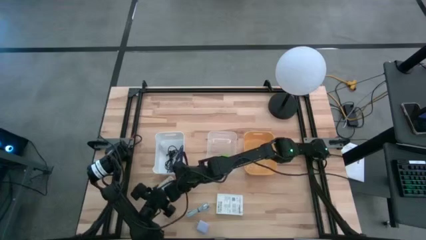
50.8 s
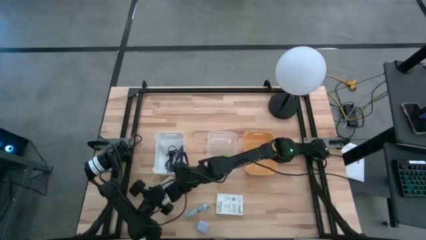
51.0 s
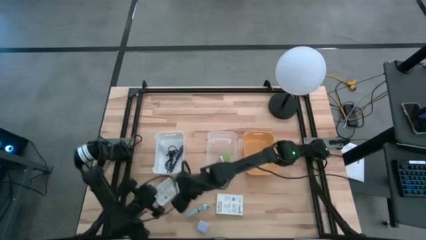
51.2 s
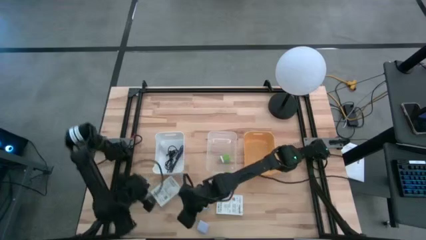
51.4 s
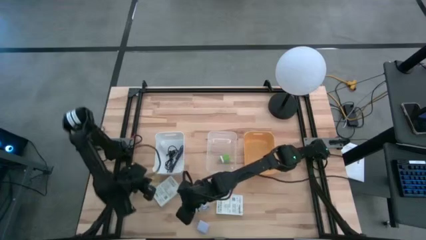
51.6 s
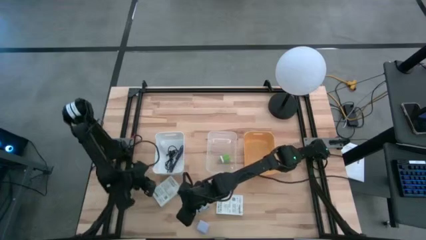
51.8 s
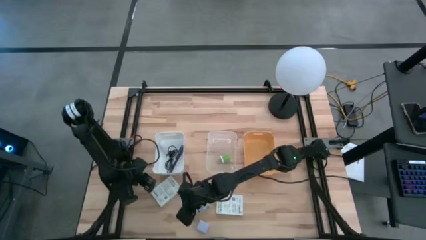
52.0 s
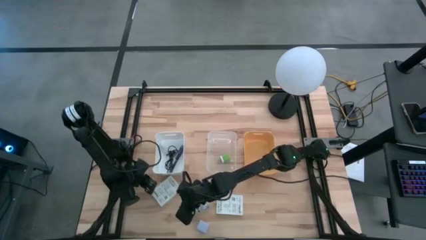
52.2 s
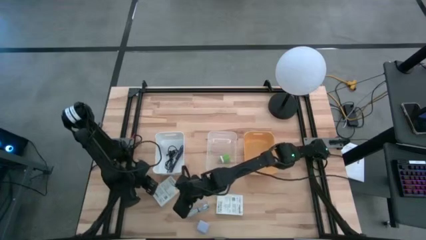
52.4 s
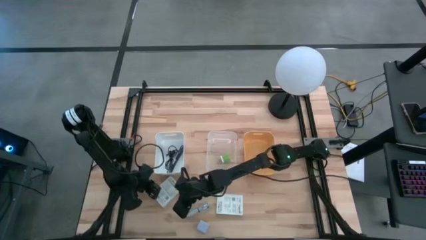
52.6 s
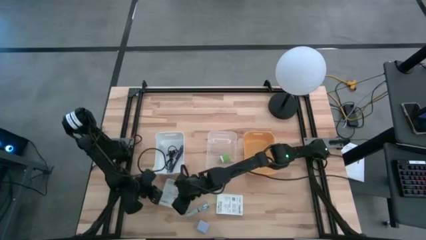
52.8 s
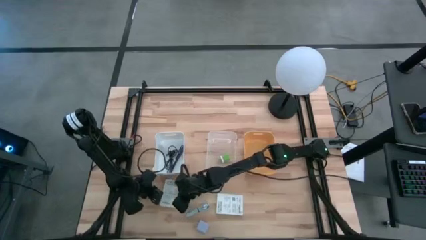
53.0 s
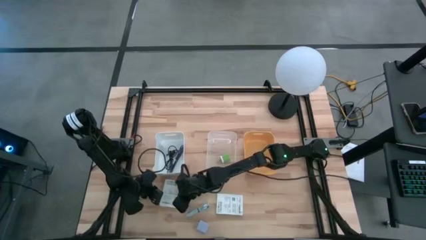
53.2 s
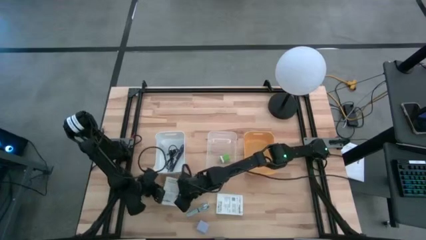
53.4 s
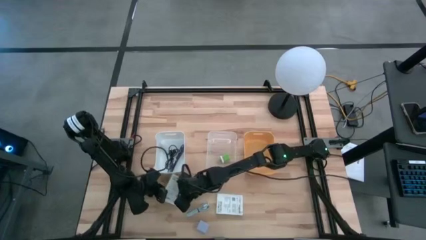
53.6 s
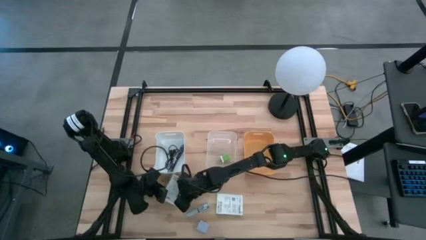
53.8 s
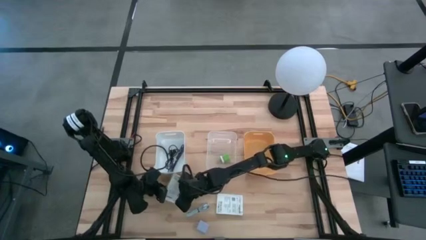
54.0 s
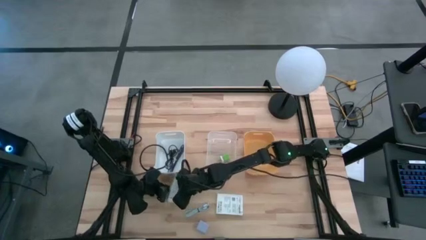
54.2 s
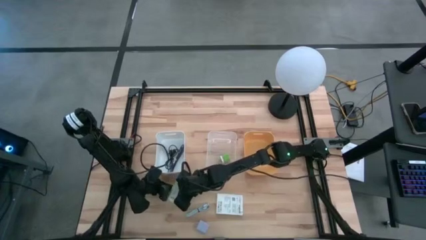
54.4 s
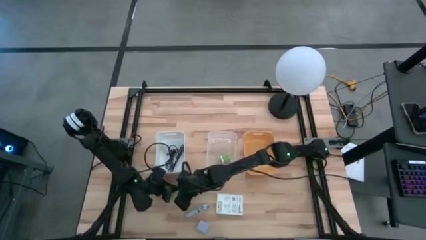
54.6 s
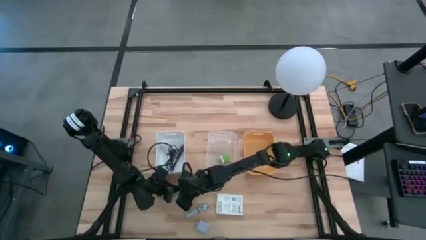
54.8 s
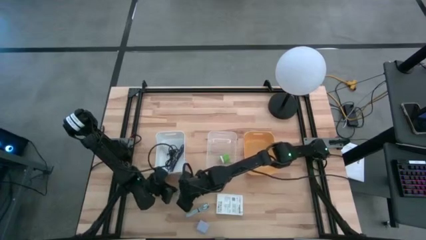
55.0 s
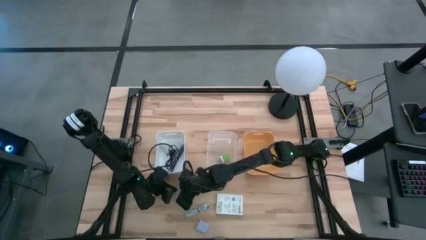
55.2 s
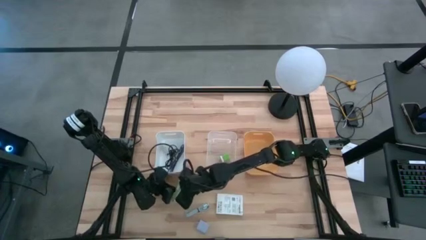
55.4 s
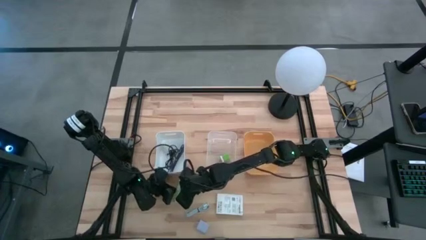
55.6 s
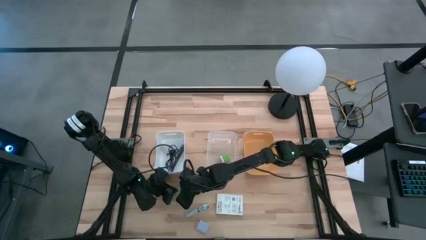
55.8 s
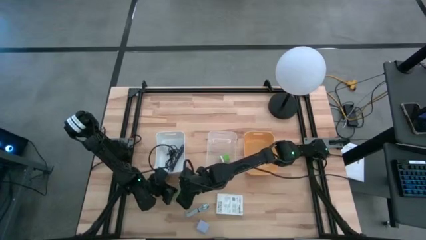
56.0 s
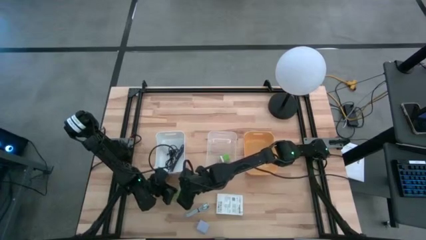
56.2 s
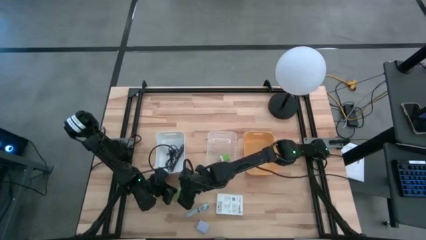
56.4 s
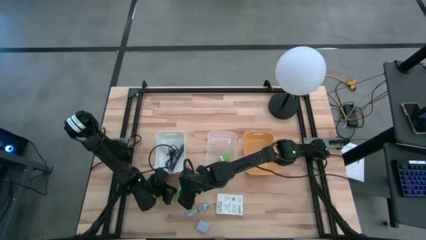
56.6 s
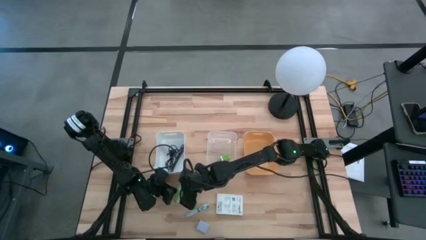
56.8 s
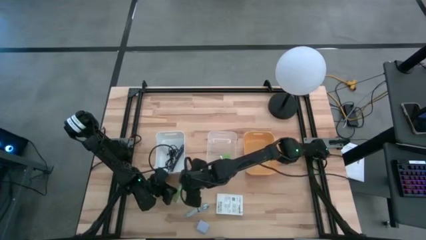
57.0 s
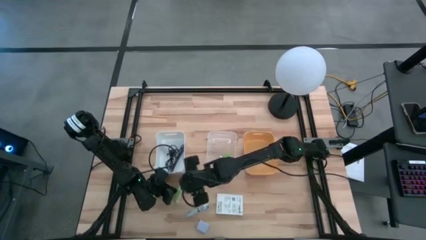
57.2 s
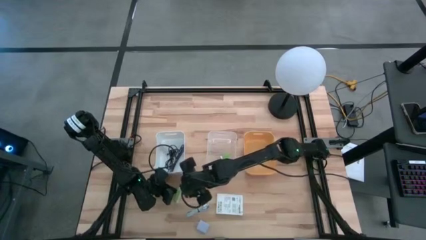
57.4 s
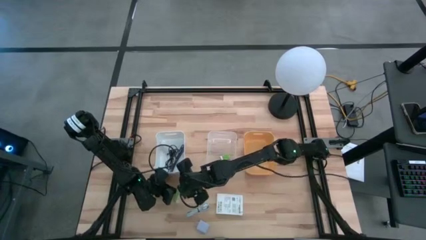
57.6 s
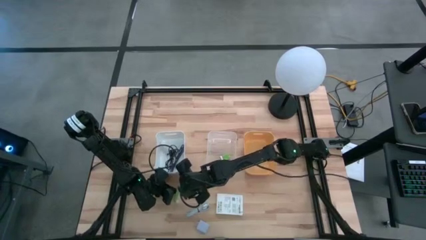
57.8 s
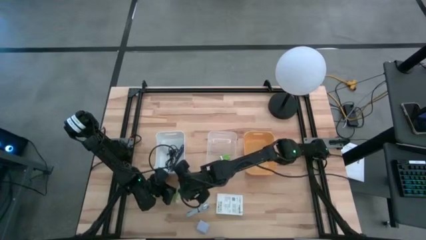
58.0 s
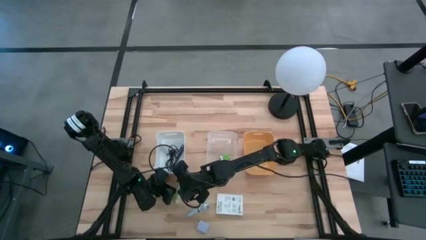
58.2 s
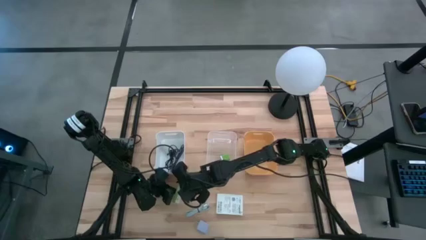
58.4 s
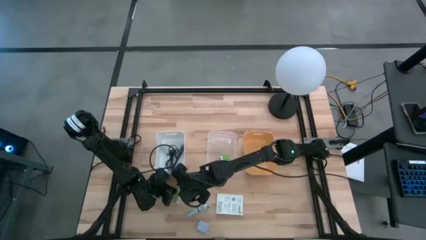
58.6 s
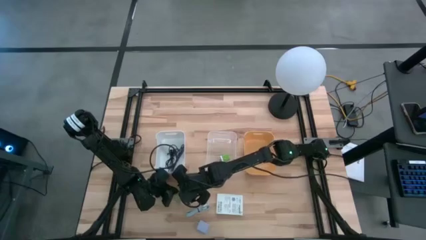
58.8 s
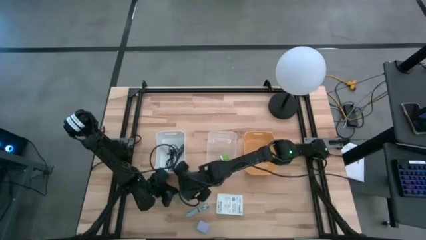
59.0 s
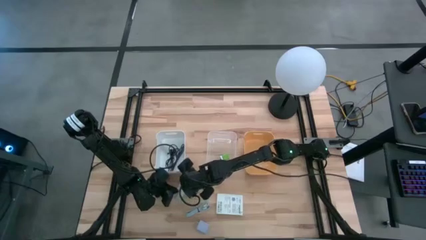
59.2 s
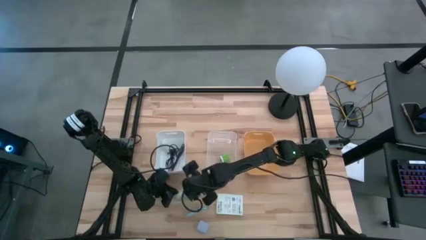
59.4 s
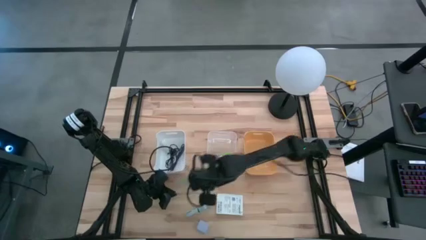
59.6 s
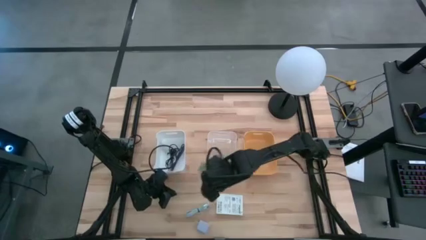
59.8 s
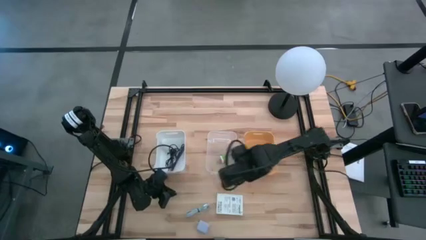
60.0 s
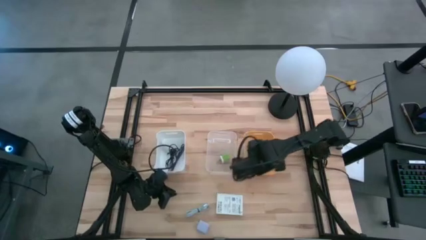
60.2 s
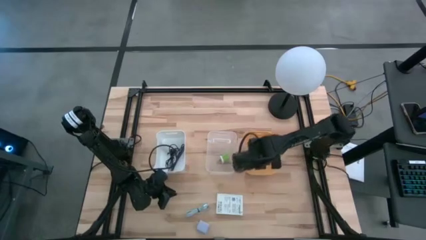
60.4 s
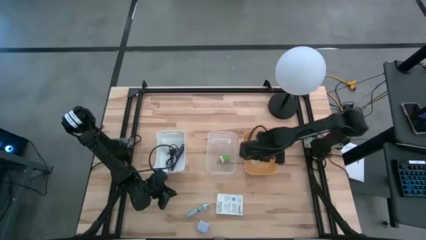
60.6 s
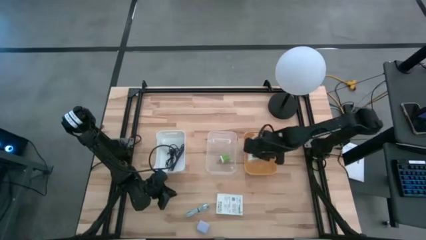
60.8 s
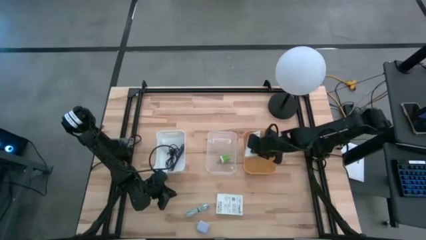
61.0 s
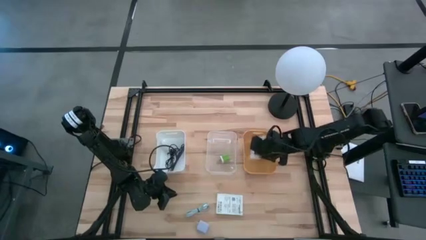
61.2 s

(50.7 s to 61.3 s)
Task: Pick and place items into bin
Put the left card reader box into the yellow bin

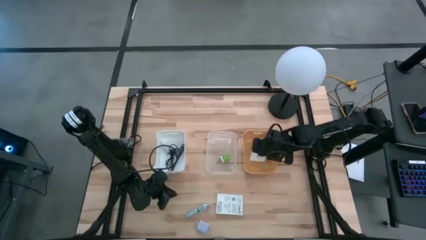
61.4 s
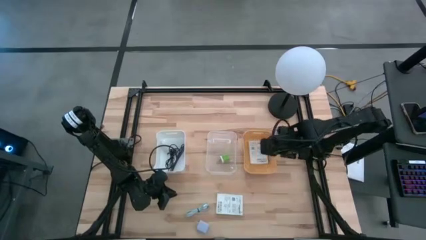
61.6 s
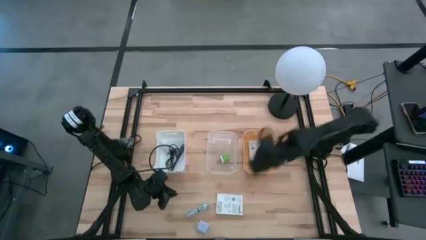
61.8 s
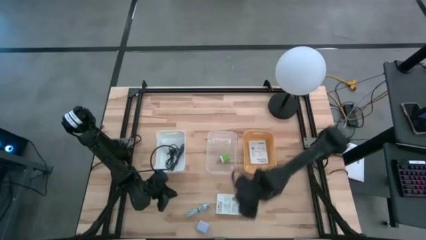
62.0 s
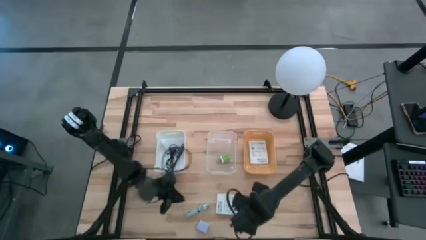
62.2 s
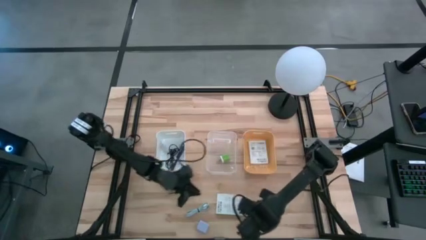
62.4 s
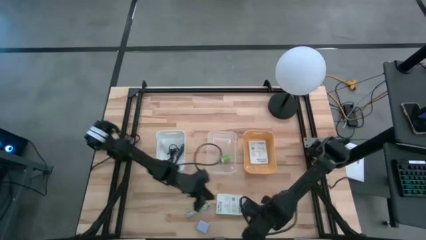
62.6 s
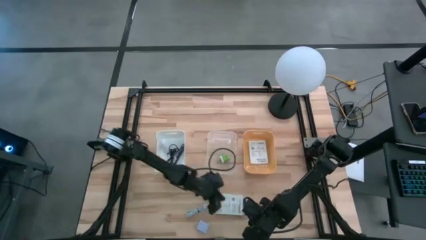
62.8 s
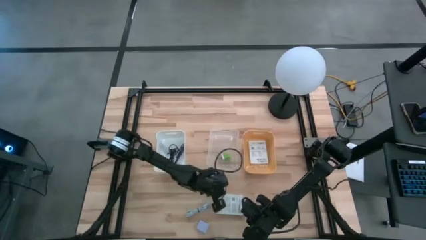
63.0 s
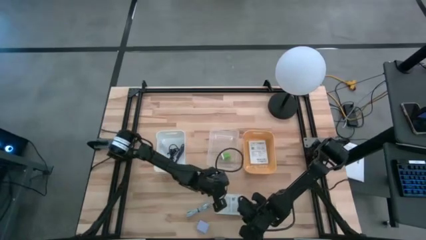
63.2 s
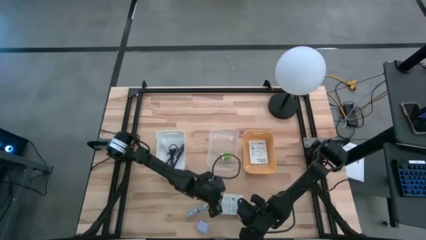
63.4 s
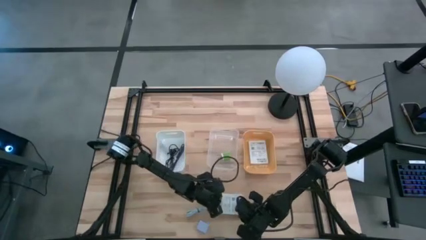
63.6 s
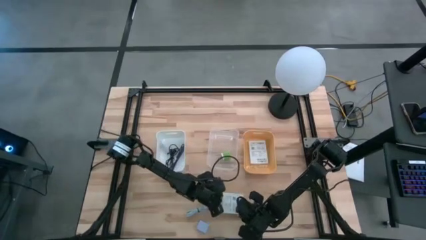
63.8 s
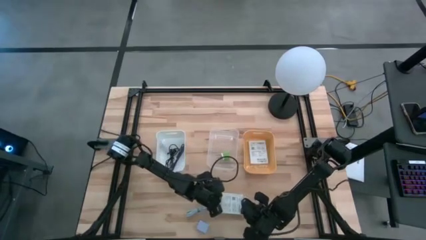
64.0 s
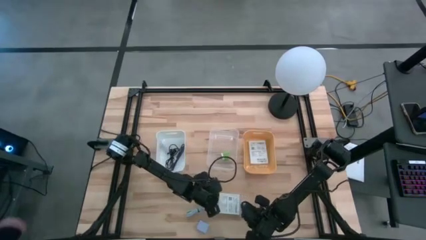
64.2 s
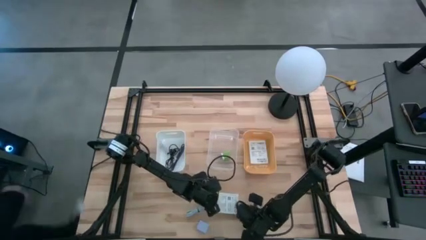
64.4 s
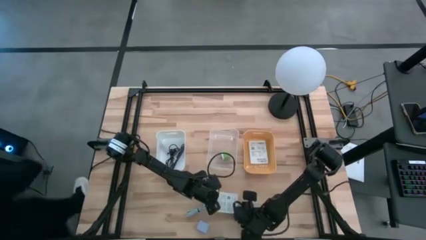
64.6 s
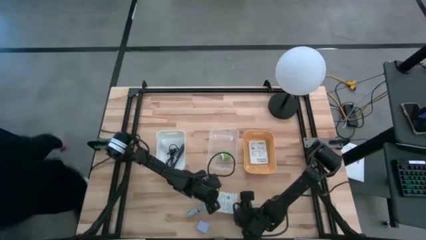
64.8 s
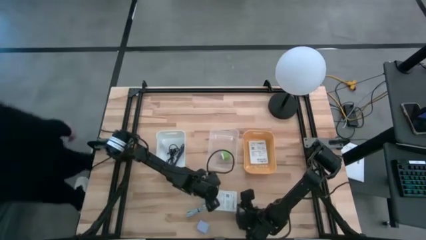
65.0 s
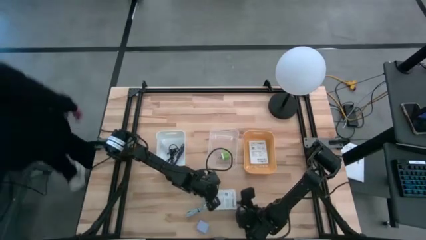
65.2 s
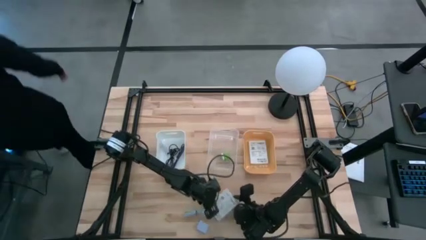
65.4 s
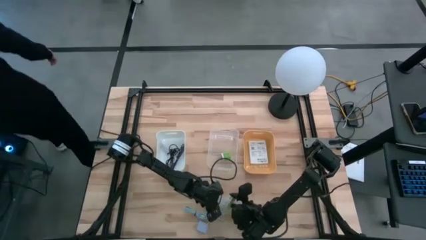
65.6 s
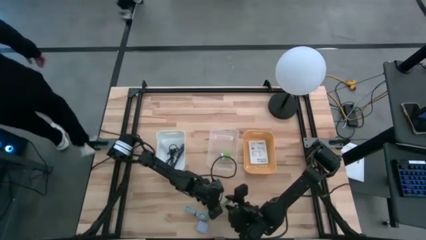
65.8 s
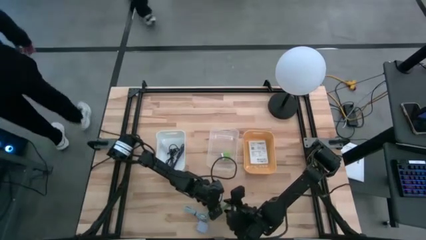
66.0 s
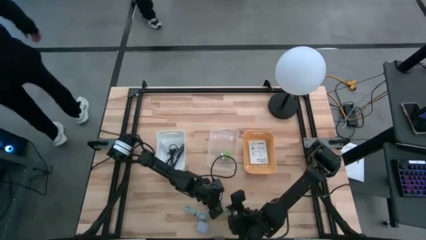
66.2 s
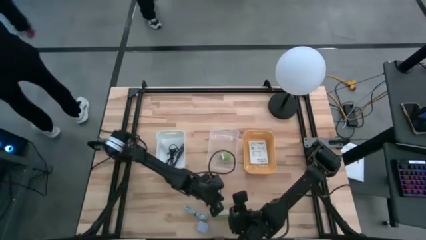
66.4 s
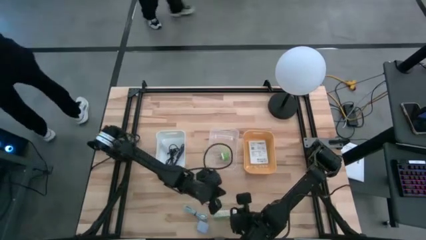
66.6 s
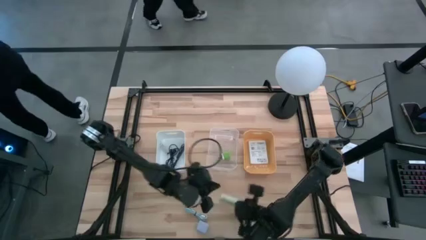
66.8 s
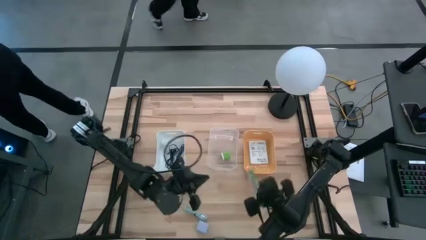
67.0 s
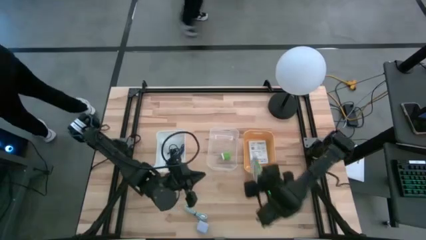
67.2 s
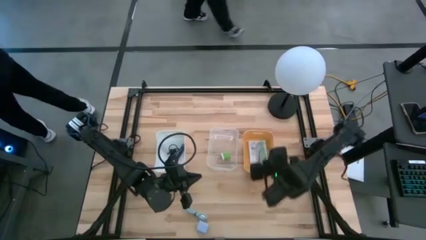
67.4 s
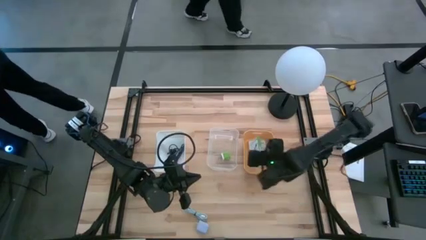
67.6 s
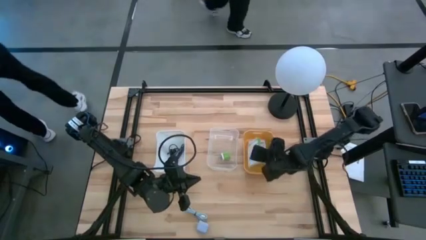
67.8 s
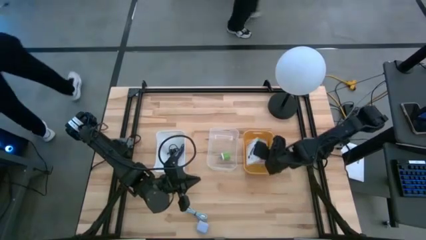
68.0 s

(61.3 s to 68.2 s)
Put the card reader box into the yellow bin
